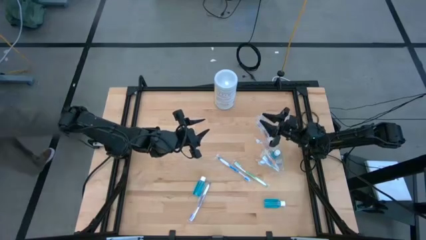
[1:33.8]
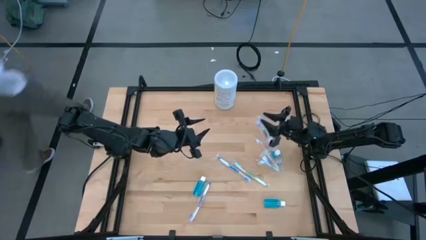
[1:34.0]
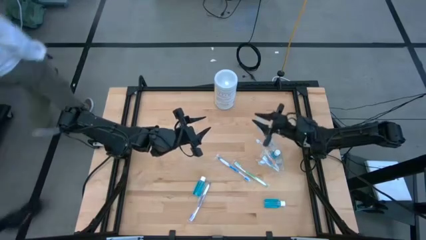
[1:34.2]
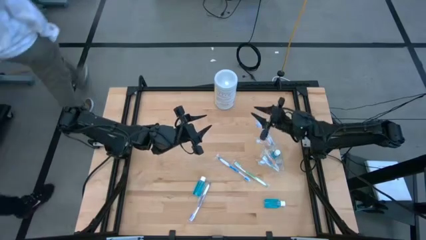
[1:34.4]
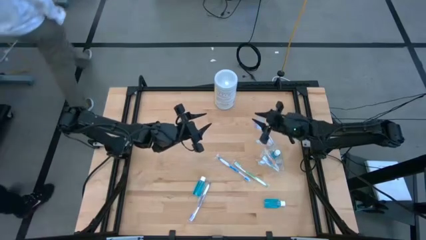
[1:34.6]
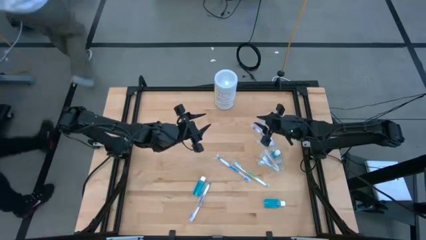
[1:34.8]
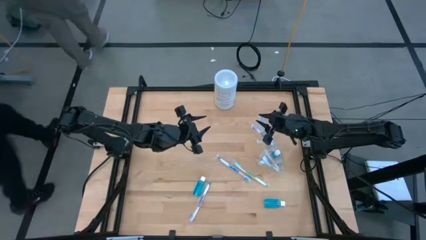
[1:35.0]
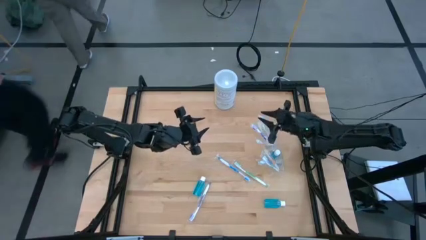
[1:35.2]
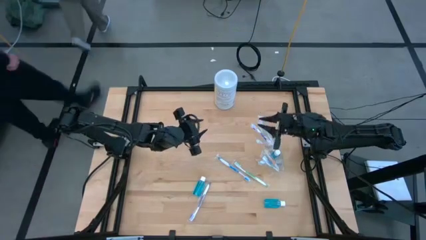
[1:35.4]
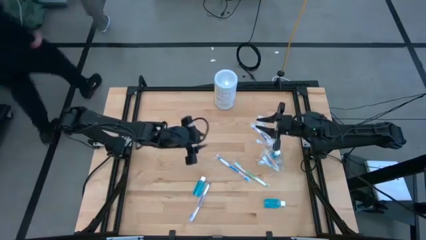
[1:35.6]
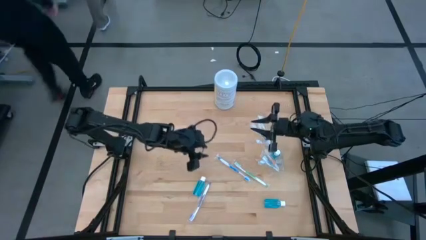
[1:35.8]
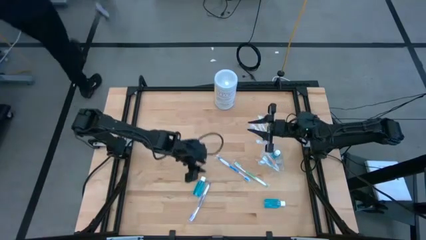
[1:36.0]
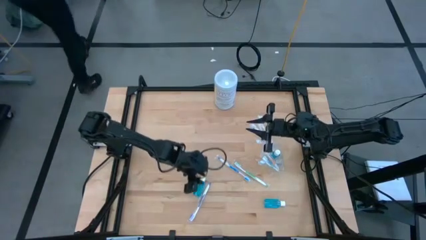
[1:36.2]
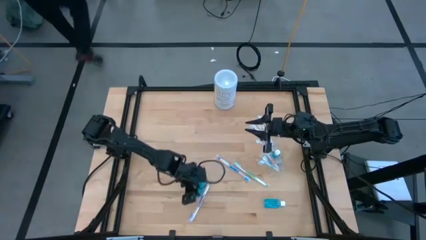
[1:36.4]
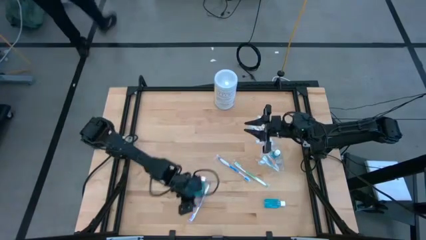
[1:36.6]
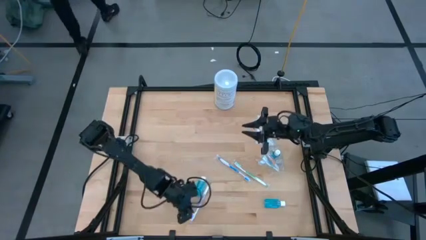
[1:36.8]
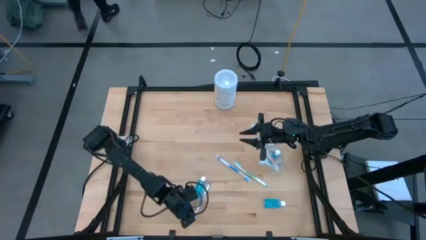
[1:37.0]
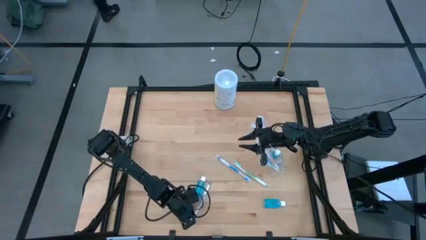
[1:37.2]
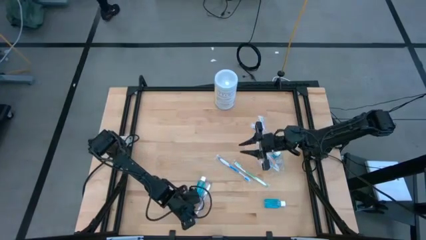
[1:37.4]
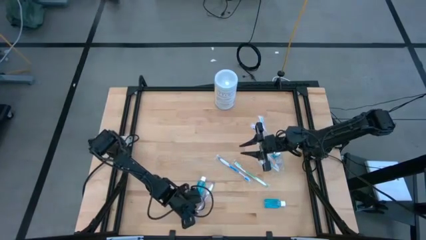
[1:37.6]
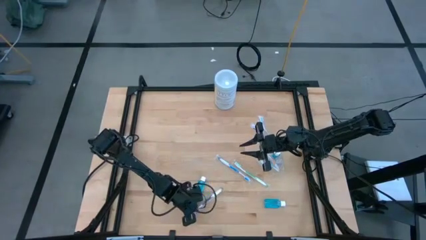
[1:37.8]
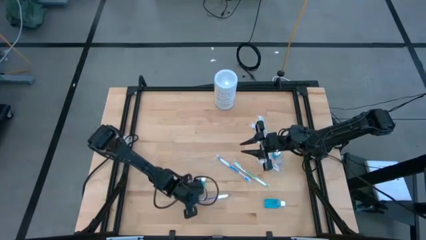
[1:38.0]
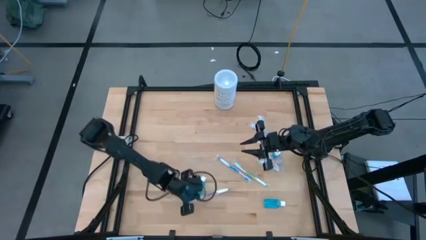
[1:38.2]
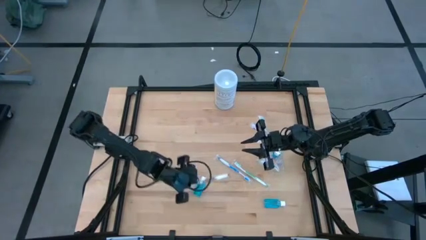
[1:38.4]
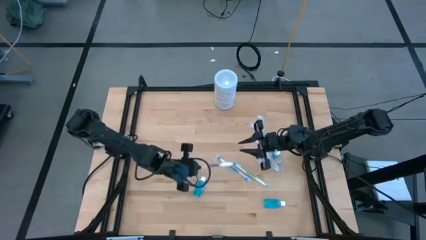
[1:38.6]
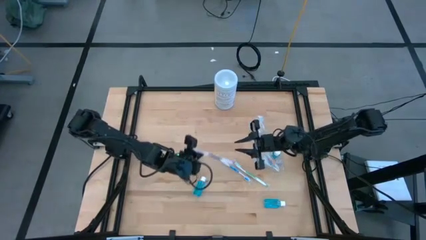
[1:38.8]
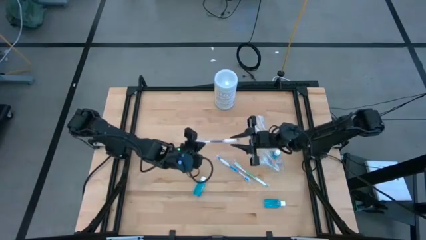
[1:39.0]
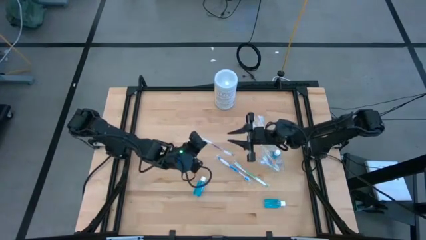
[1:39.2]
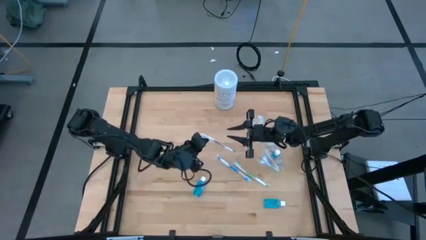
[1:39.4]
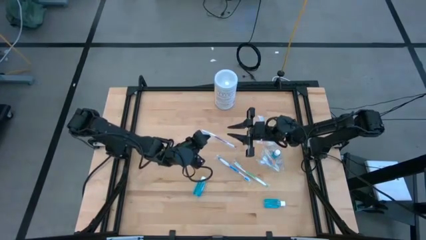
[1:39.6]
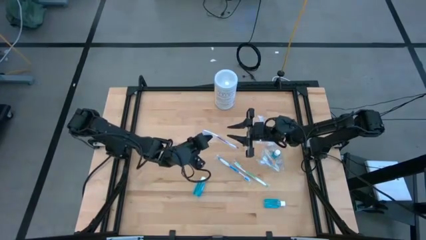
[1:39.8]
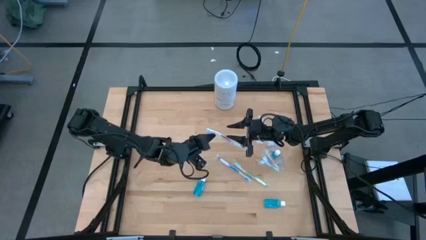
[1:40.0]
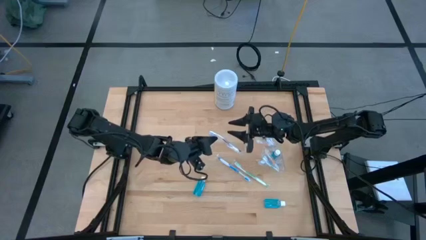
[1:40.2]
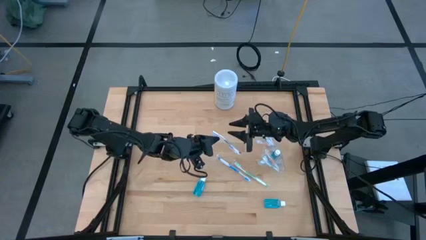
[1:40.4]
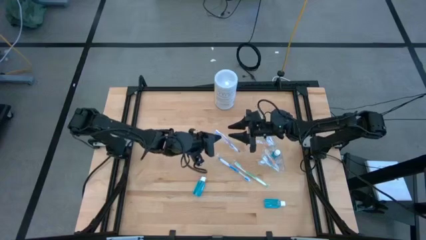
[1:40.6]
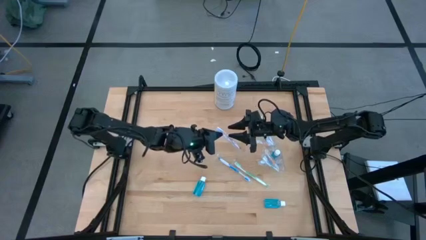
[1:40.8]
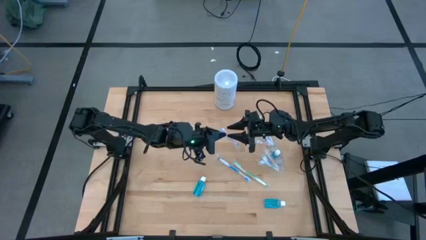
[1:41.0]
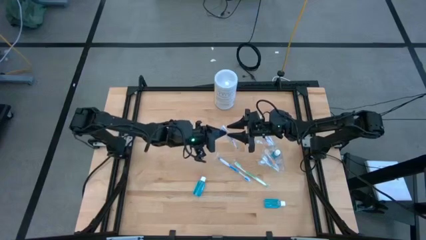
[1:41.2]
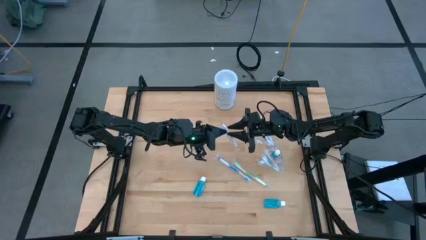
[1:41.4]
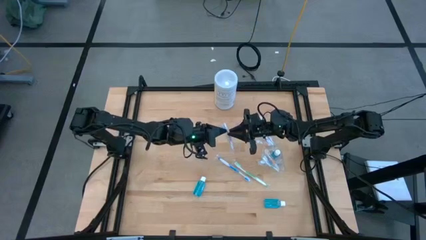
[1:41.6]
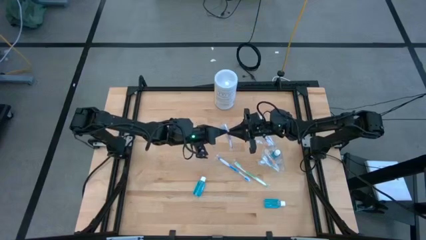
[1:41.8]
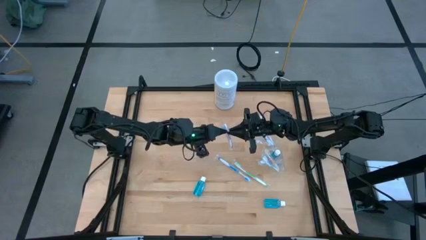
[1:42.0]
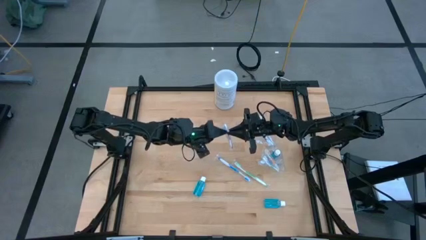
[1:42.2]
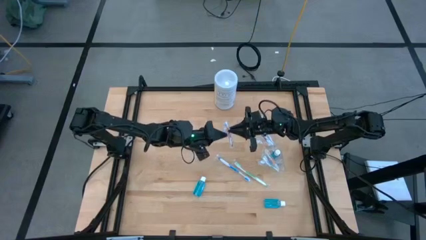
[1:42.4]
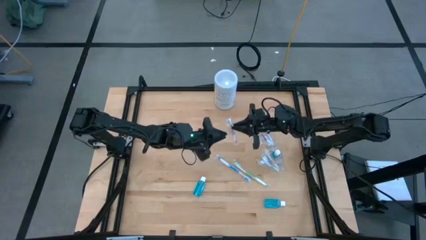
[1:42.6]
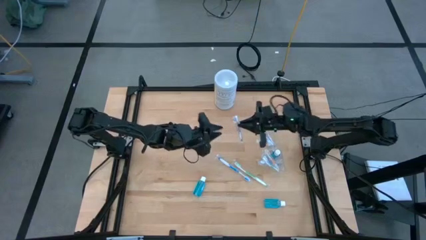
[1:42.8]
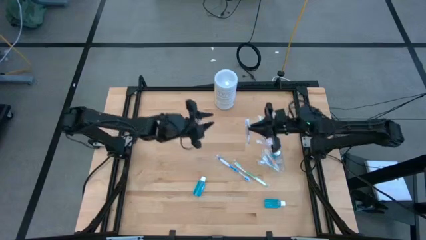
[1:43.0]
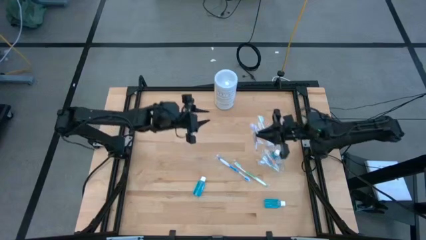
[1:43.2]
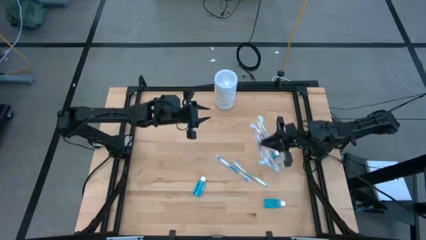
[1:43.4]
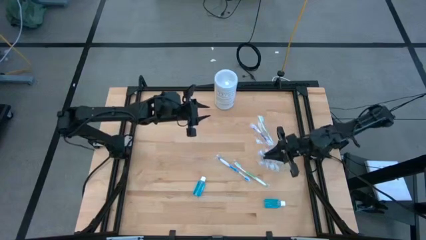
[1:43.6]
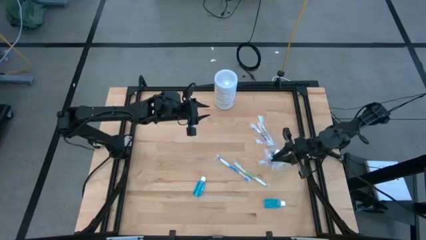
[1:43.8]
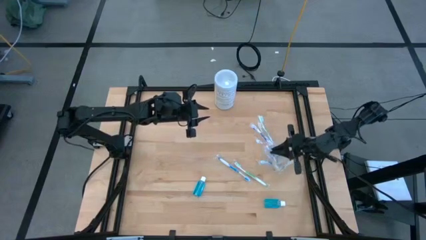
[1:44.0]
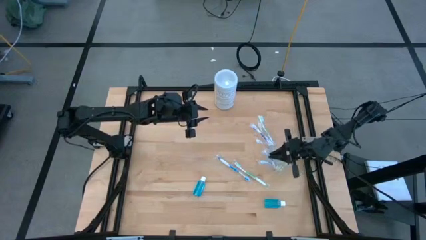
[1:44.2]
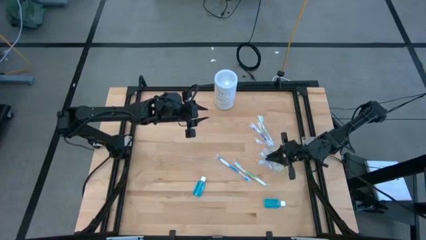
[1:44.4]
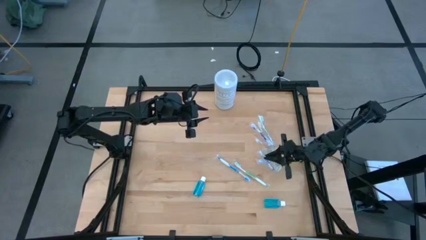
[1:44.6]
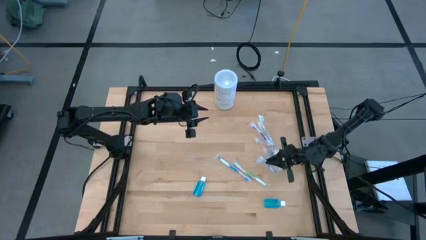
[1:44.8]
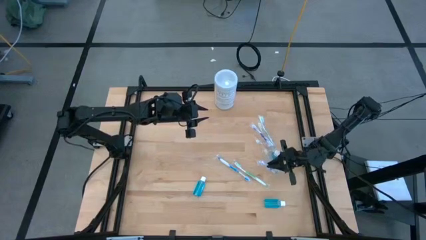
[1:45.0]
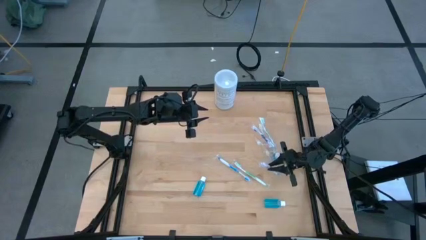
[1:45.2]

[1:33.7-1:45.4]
Task: Pick & Place toothbrushing station
Put the purple toothbrush into the transparent organizer
